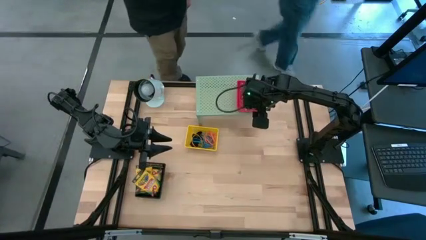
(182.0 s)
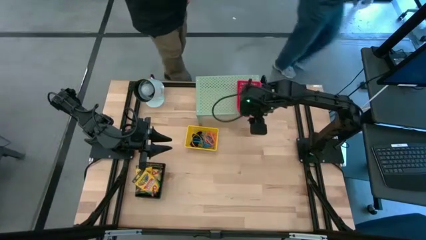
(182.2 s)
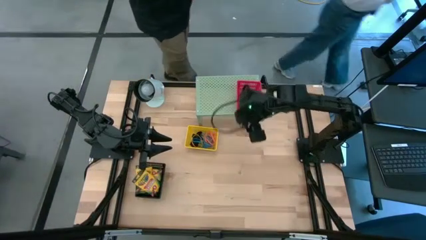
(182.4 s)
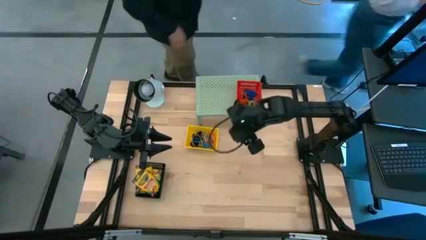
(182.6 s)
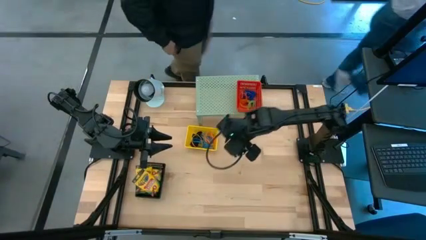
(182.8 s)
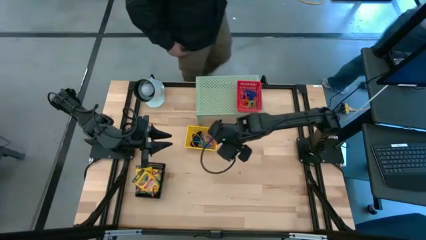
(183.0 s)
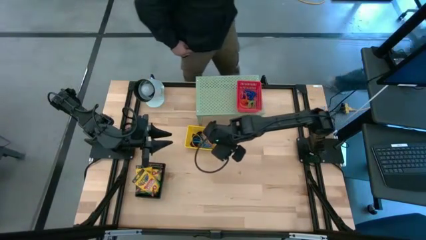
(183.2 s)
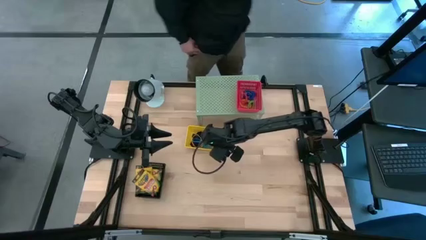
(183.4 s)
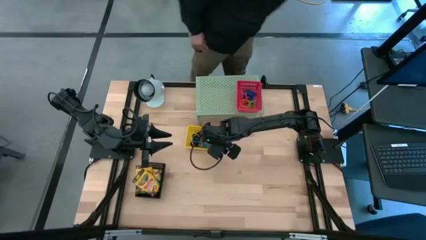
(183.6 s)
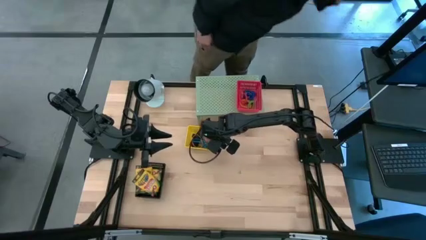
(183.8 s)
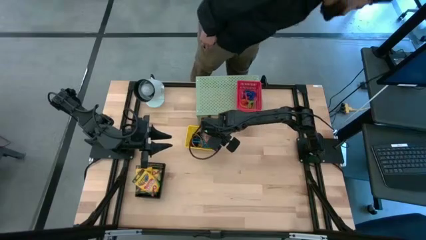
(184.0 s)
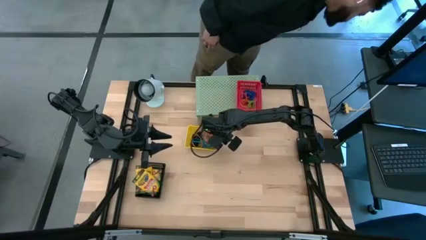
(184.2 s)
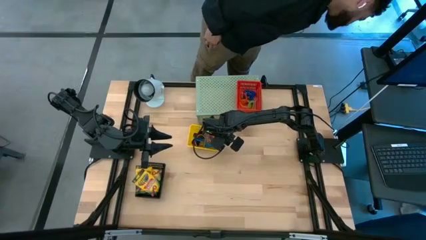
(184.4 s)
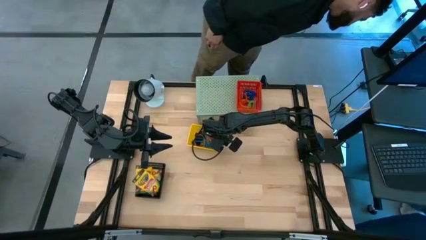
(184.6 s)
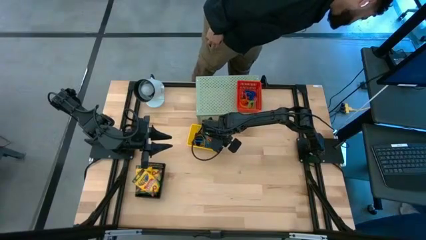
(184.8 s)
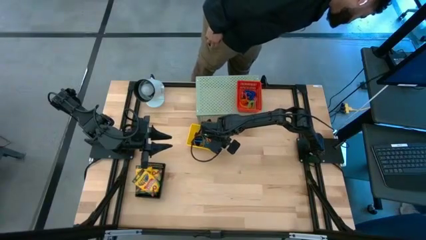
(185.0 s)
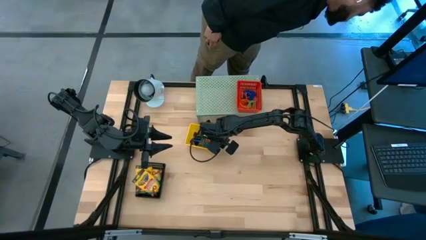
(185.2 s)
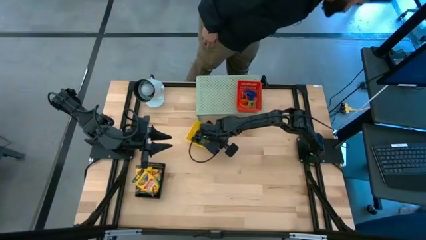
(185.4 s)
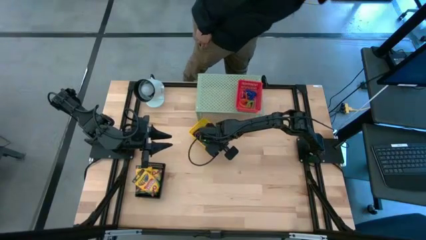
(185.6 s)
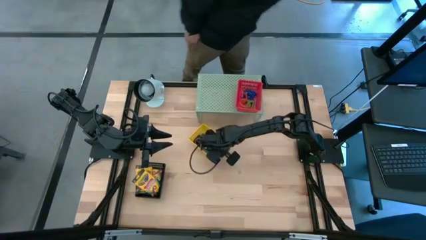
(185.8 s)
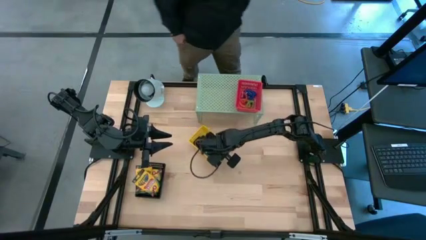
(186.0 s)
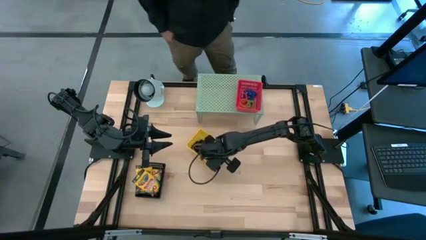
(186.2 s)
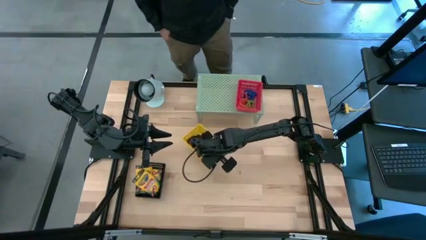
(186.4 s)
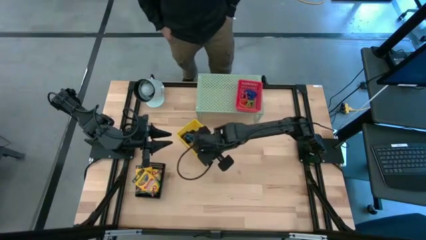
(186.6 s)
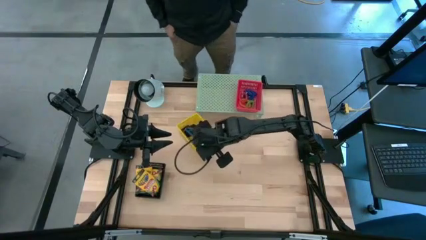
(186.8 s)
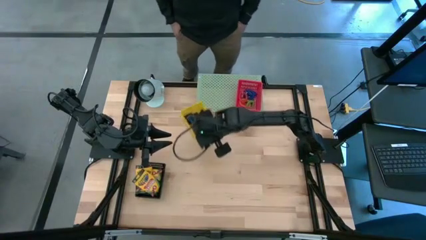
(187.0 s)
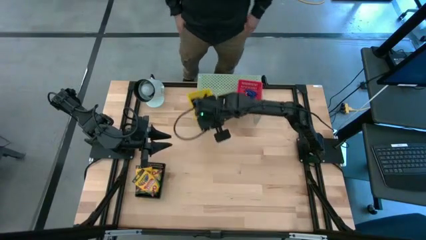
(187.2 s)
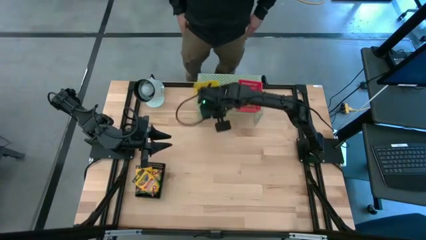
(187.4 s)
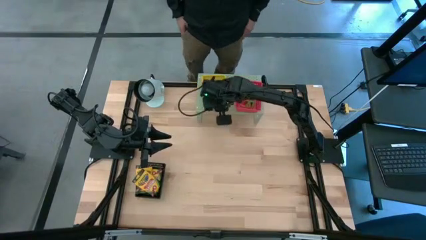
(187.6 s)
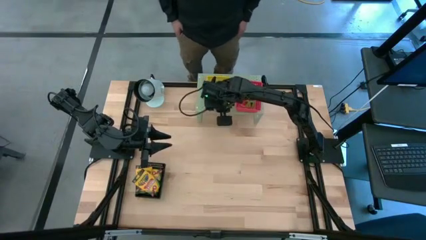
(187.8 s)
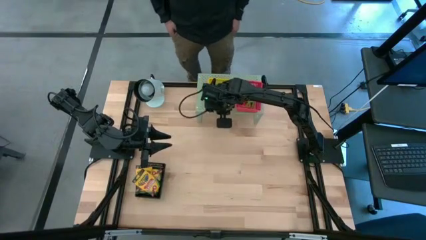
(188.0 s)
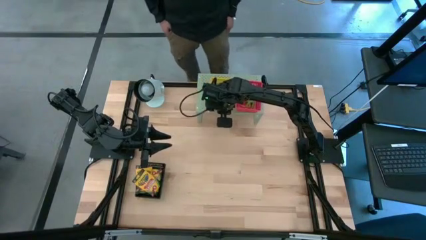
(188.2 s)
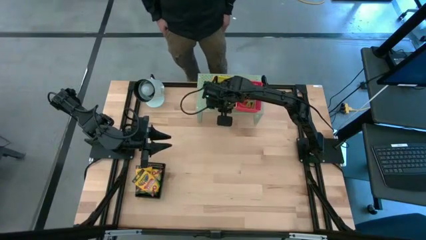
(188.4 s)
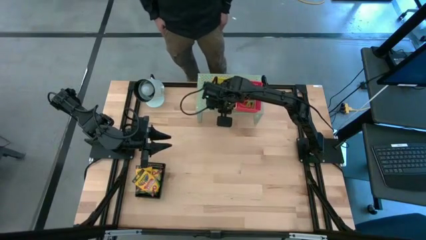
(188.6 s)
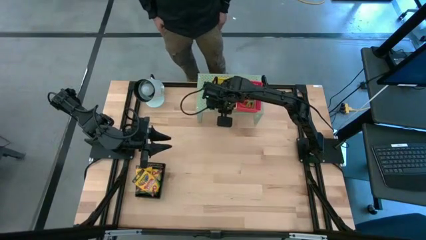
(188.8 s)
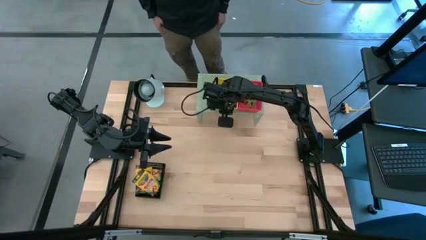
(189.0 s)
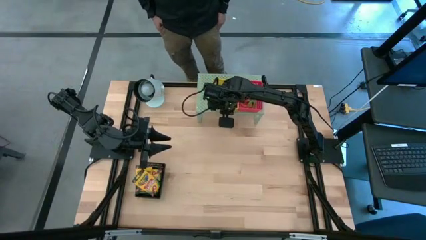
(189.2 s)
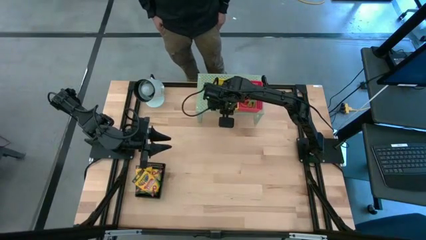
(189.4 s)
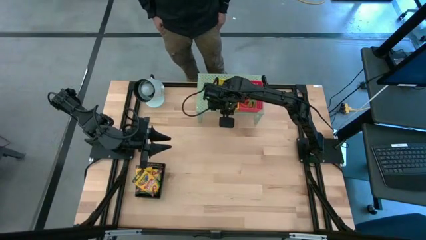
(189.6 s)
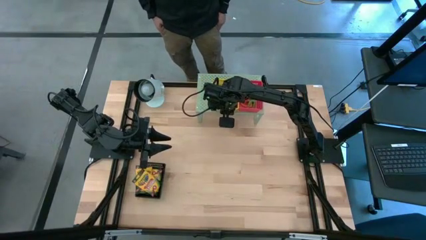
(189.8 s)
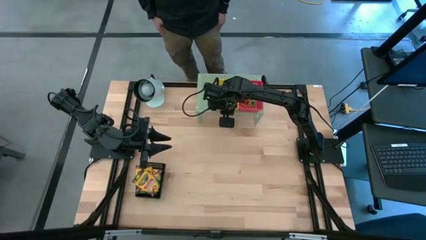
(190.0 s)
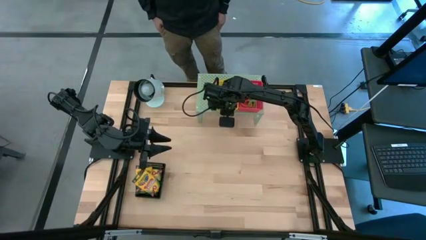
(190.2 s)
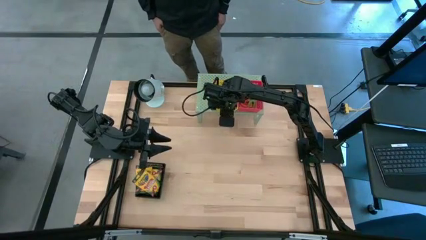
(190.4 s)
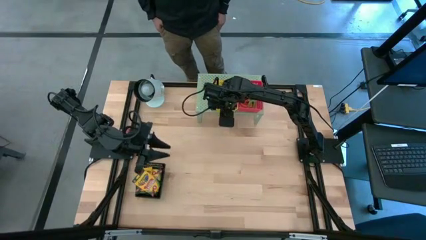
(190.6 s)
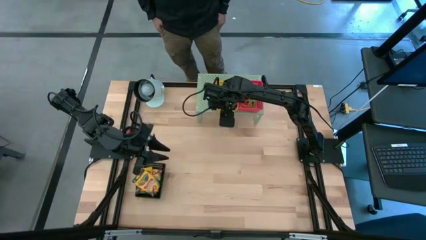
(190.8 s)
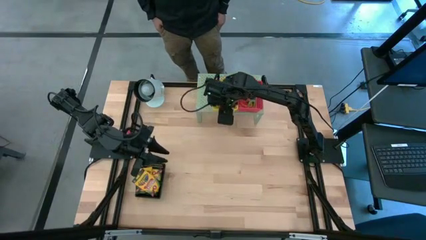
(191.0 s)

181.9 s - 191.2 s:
Task: Pick & Place Office Desk Supplies
Put the yellow bin on the shelf

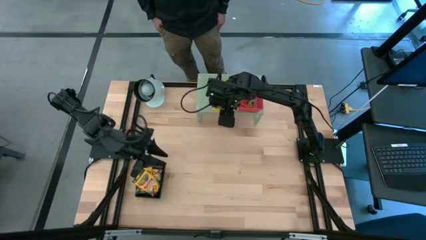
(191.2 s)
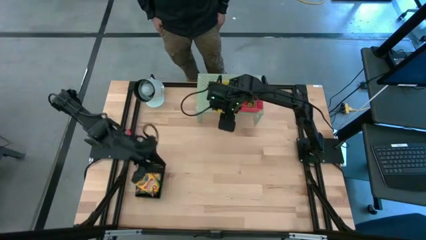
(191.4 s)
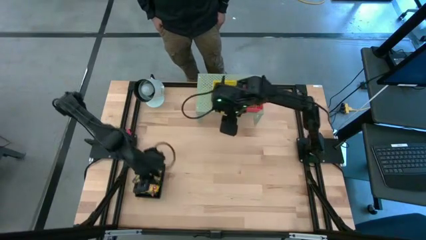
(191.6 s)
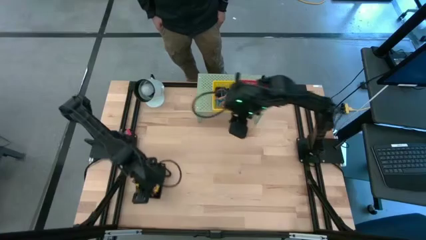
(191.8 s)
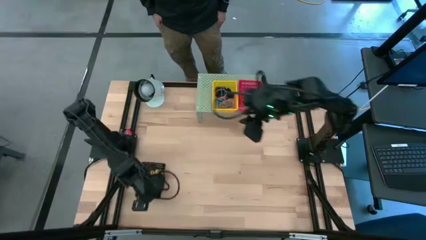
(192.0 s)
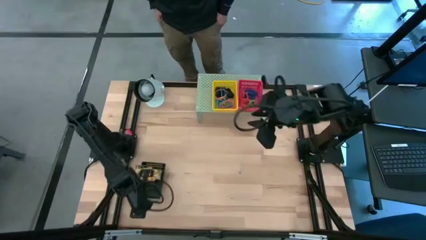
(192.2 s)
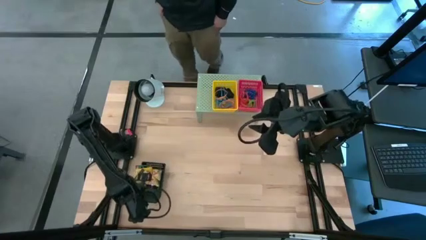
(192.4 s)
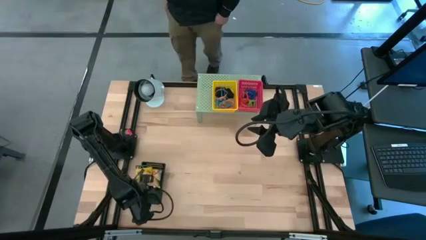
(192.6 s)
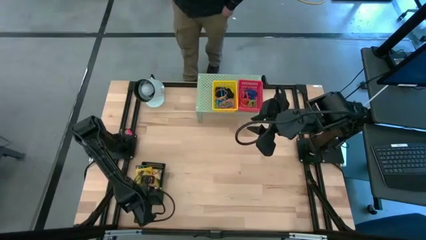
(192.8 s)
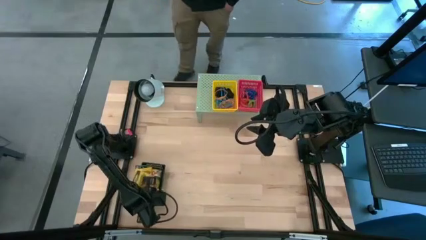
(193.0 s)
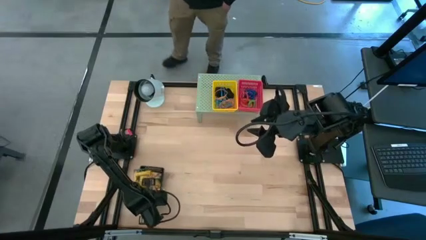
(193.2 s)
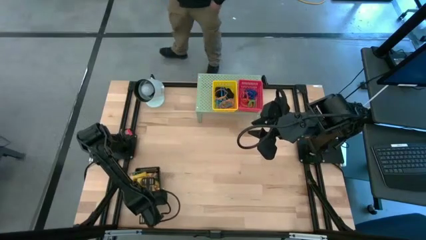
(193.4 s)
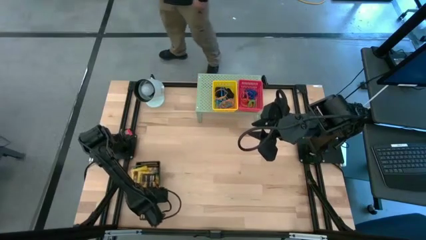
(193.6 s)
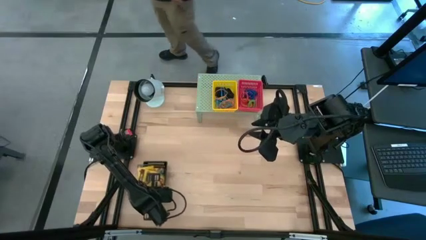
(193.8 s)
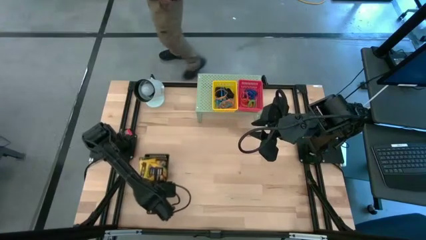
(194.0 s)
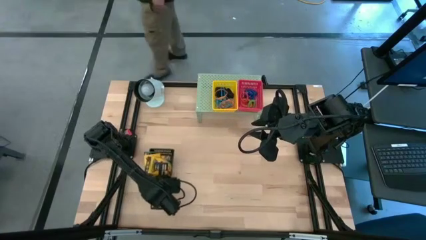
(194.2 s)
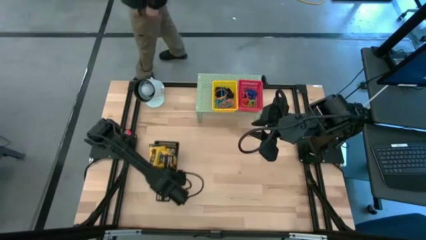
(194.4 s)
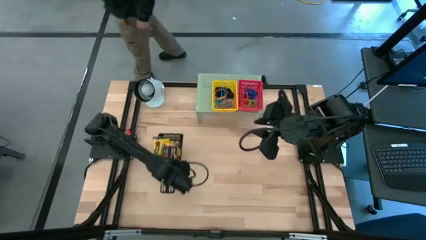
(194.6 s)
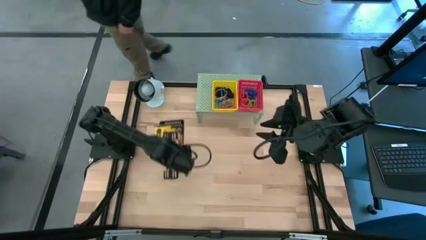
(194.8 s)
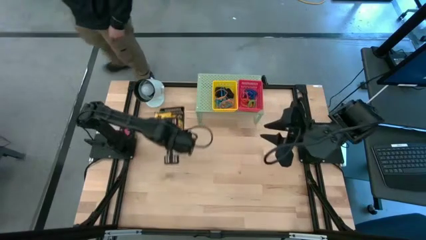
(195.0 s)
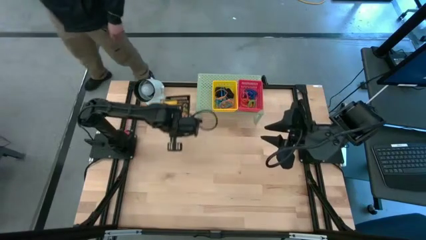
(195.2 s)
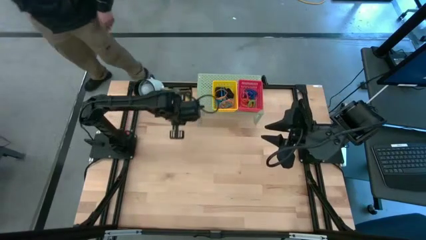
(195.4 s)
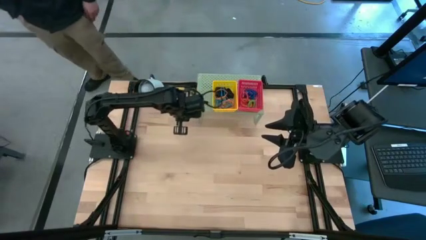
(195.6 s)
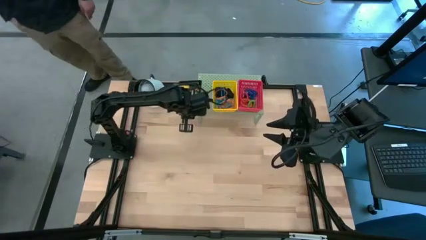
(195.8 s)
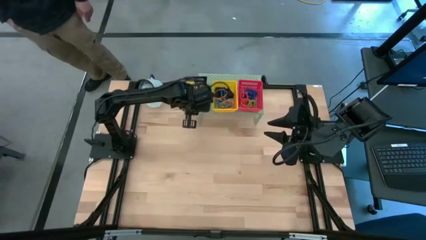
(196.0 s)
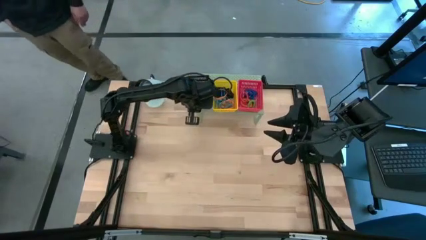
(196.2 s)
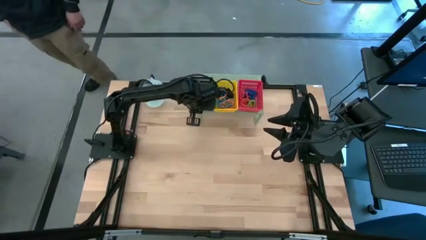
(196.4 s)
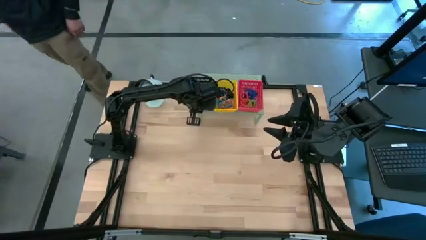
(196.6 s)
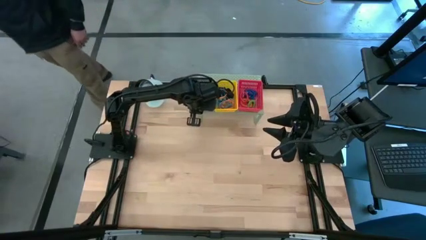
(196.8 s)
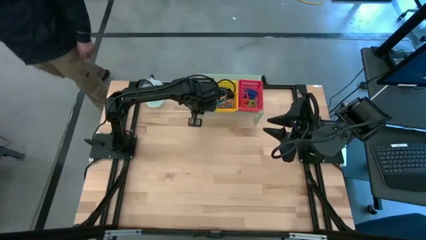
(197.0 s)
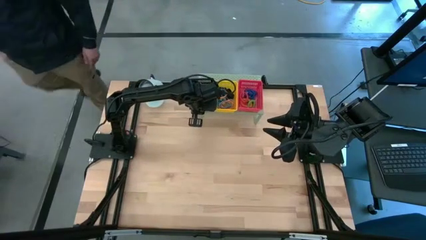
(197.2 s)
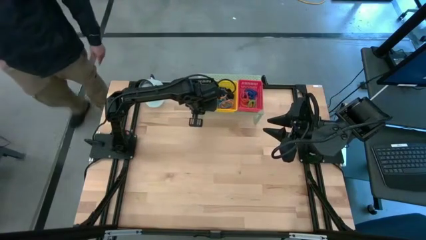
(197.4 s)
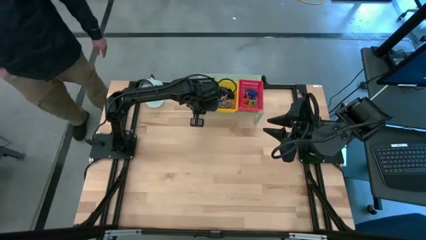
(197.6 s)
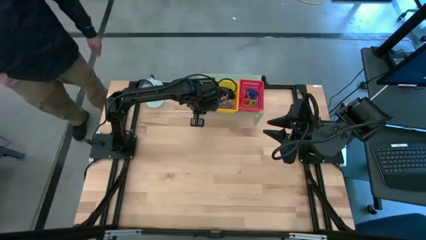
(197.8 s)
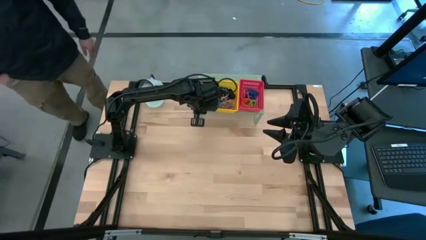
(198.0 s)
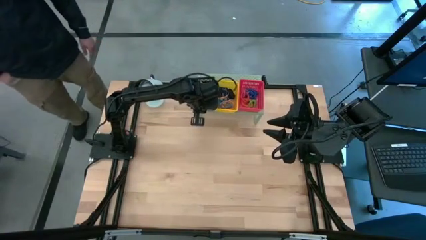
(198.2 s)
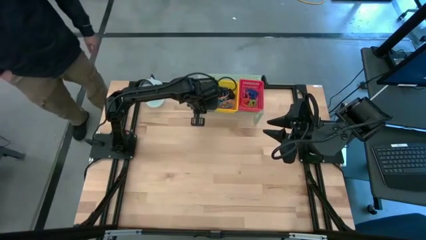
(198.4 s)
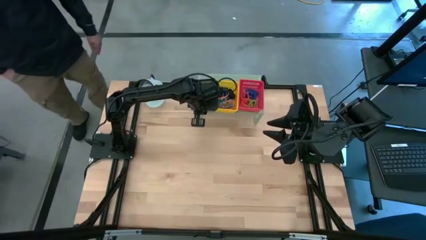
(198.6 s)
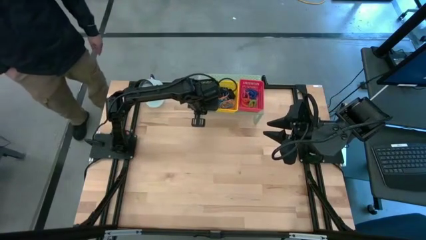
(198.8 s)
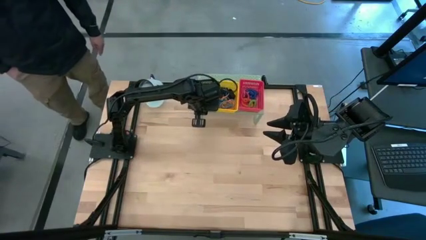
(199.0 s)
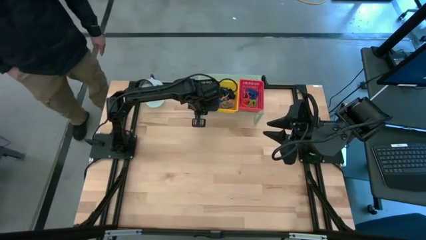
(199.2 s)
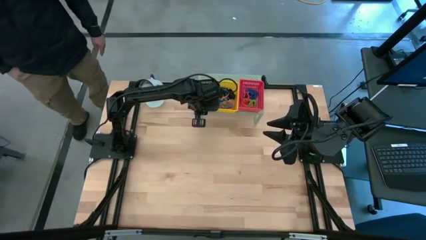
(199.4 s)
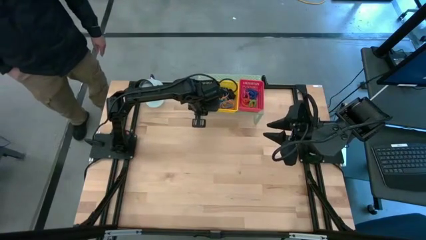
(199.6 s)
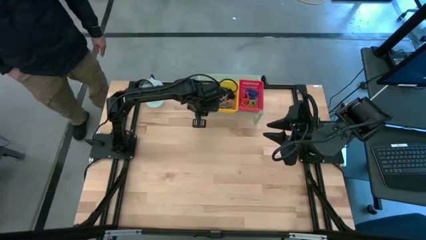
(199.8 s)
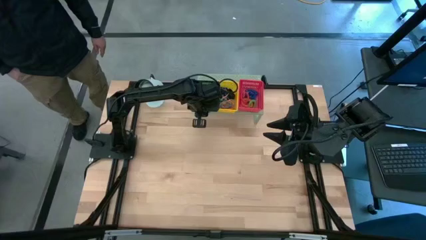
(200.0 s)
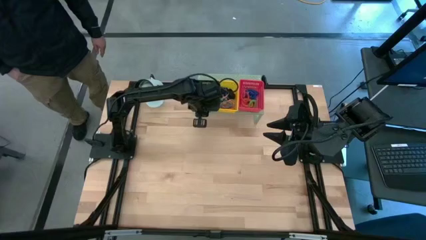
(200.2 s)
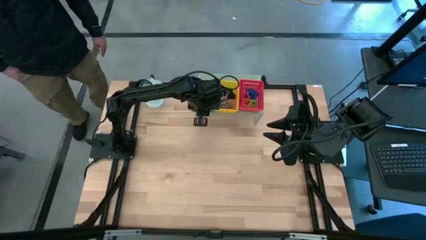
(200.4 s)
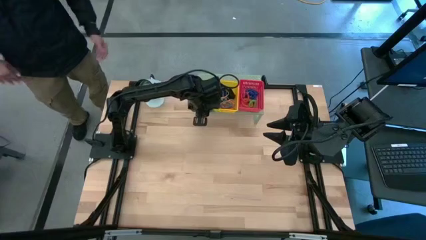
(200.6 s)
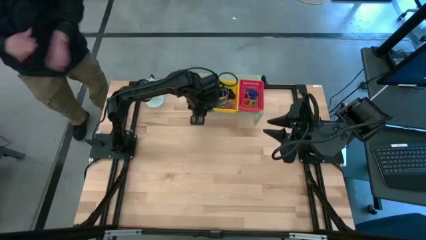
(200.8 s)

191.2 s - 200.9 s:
Put the black bin on the shelf
